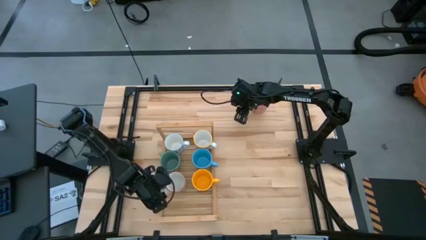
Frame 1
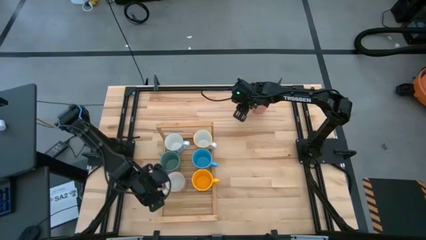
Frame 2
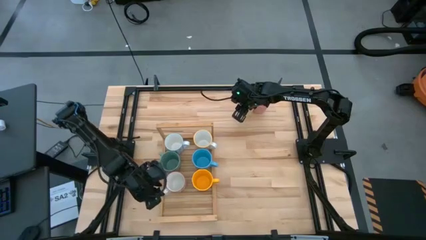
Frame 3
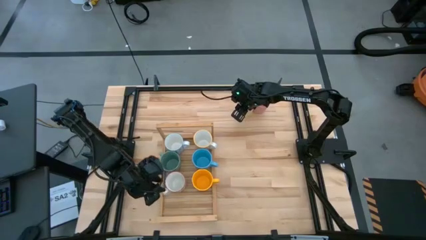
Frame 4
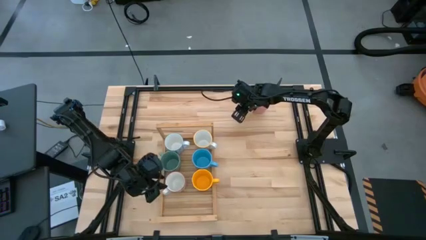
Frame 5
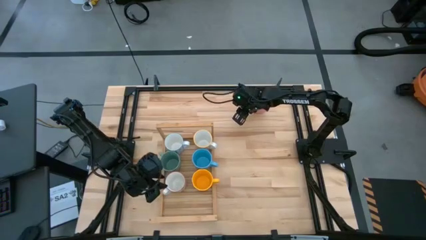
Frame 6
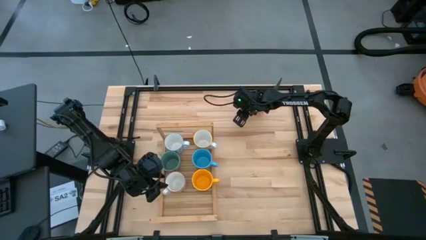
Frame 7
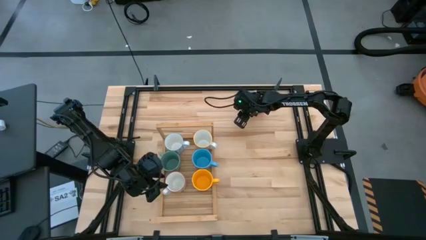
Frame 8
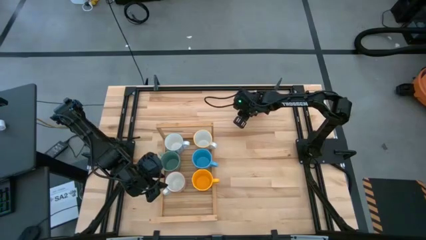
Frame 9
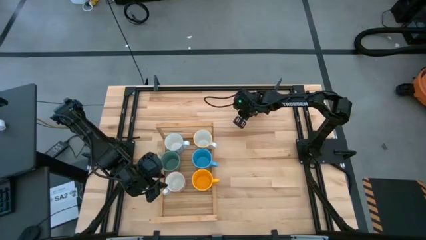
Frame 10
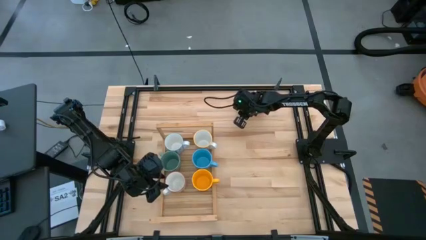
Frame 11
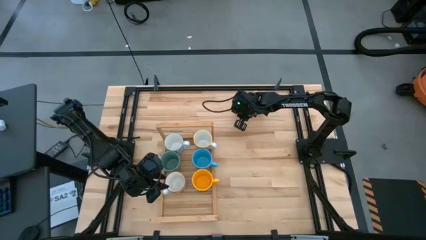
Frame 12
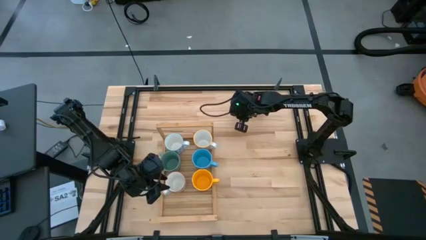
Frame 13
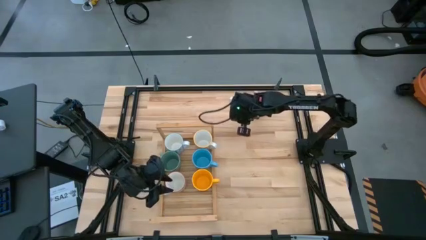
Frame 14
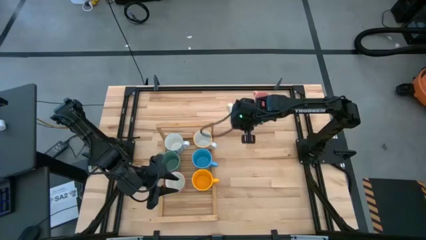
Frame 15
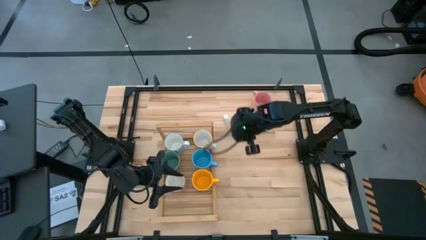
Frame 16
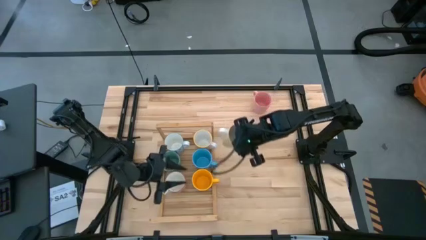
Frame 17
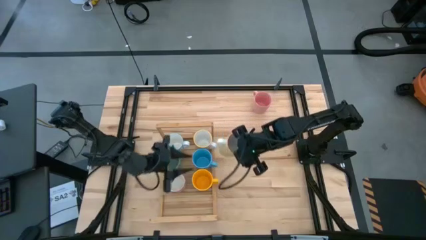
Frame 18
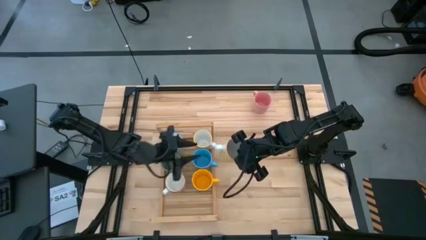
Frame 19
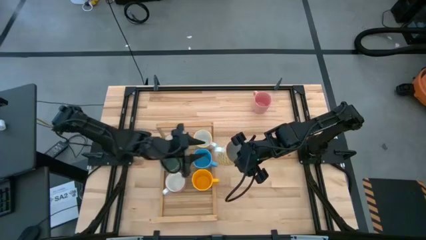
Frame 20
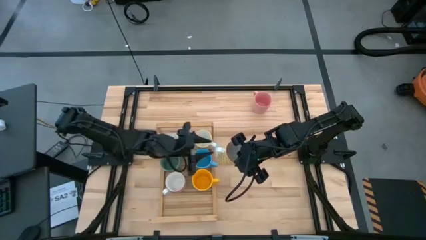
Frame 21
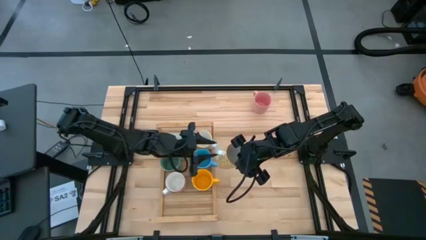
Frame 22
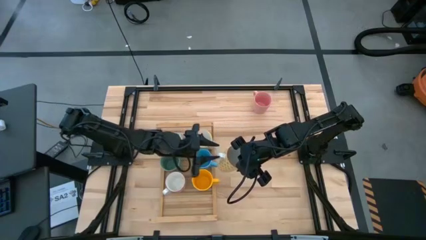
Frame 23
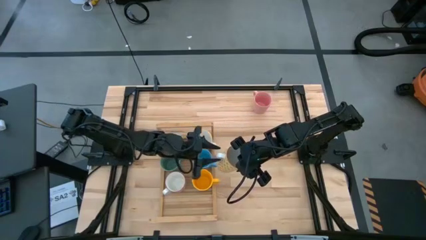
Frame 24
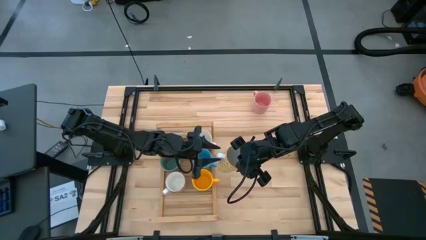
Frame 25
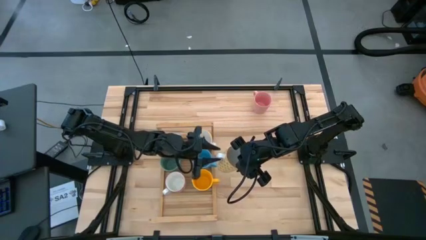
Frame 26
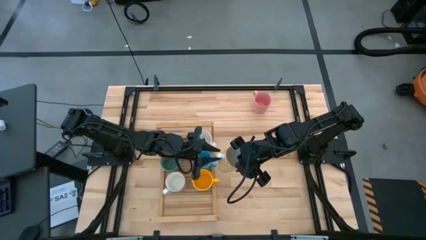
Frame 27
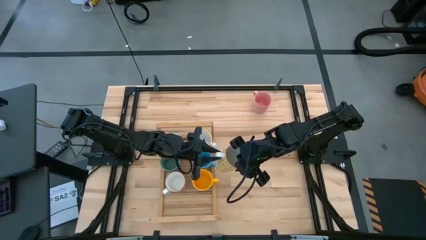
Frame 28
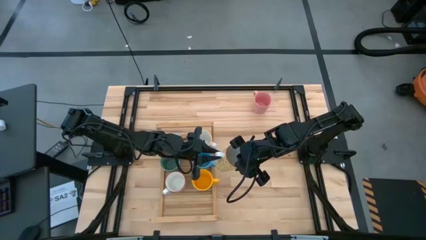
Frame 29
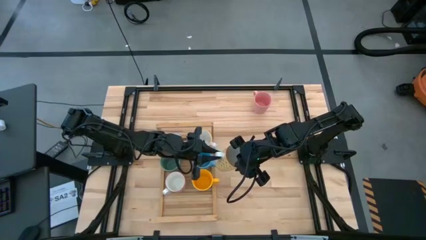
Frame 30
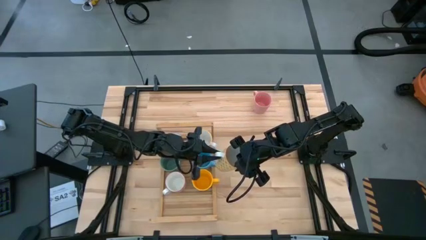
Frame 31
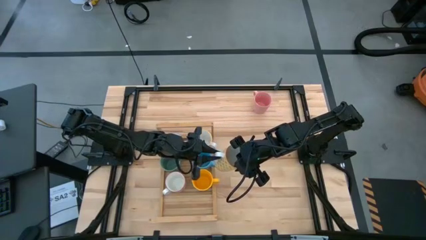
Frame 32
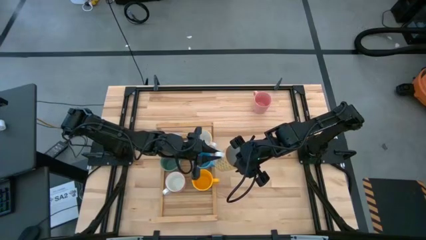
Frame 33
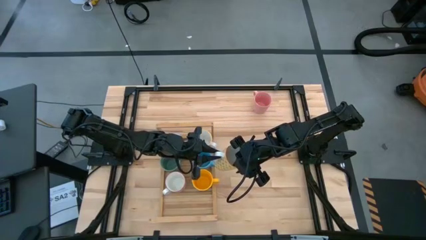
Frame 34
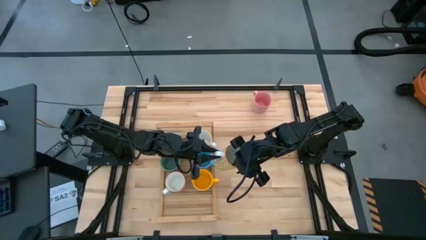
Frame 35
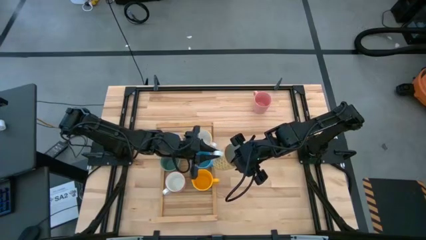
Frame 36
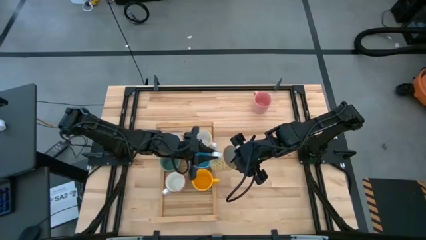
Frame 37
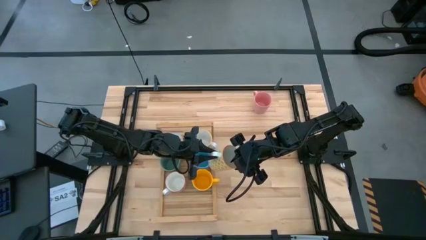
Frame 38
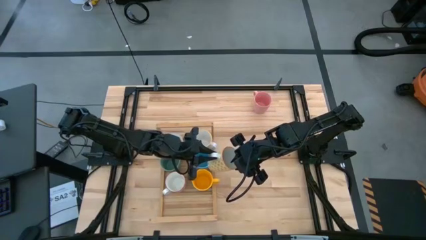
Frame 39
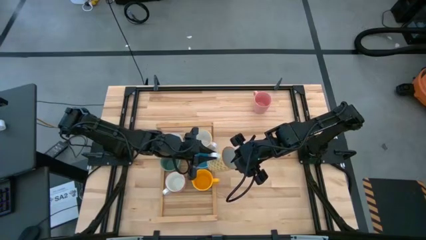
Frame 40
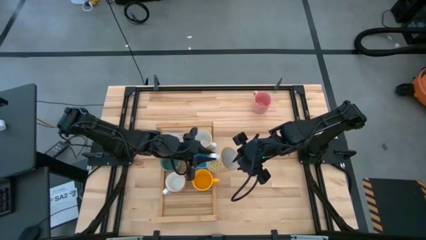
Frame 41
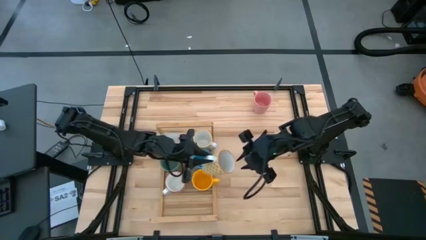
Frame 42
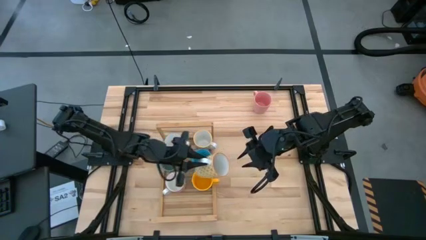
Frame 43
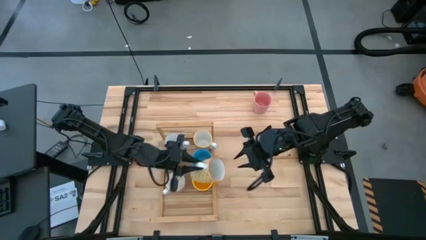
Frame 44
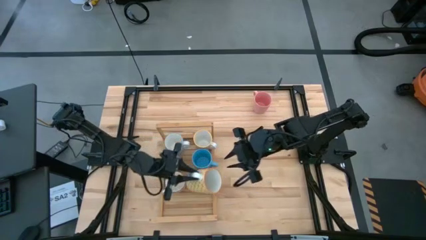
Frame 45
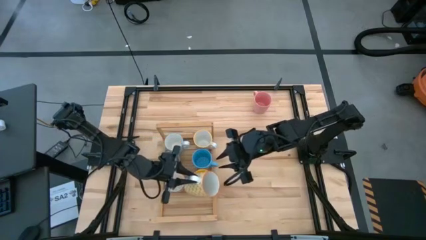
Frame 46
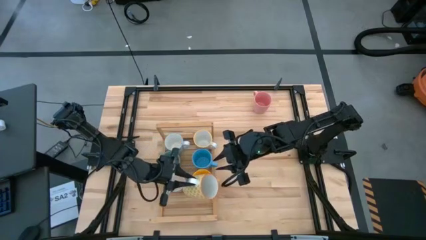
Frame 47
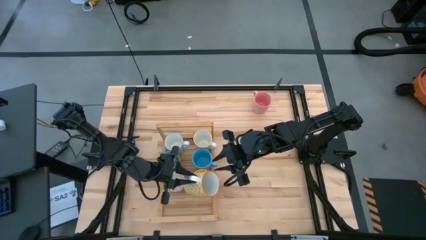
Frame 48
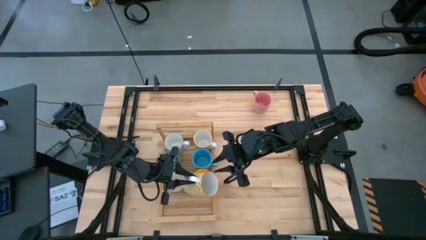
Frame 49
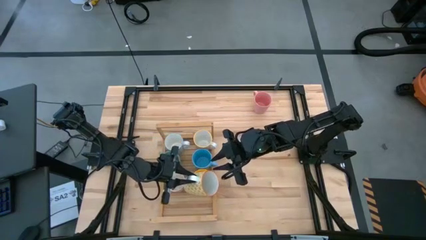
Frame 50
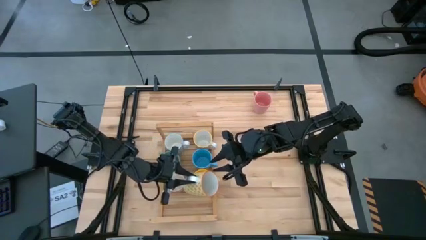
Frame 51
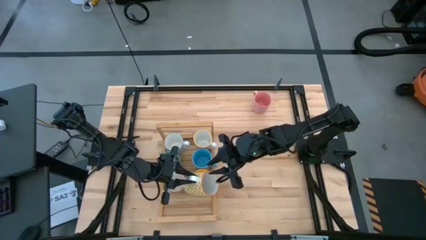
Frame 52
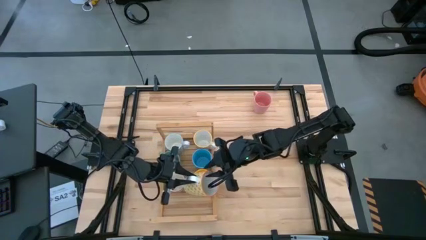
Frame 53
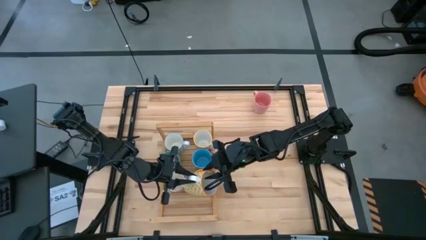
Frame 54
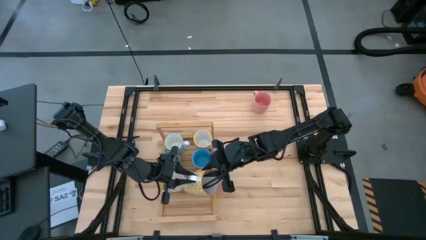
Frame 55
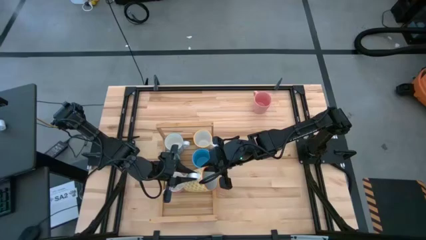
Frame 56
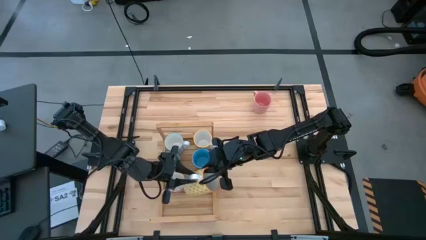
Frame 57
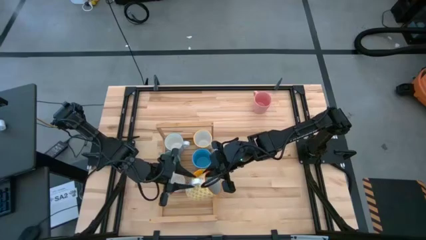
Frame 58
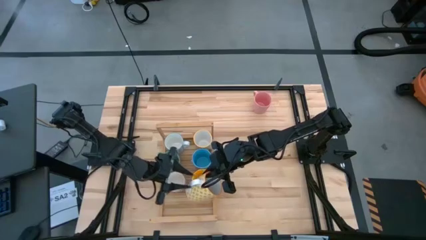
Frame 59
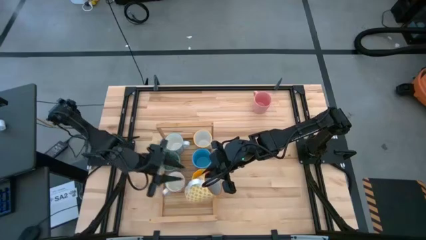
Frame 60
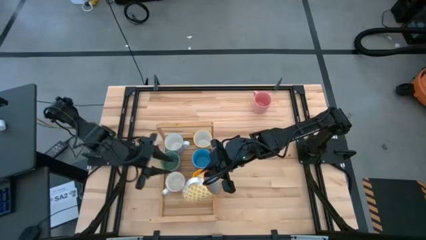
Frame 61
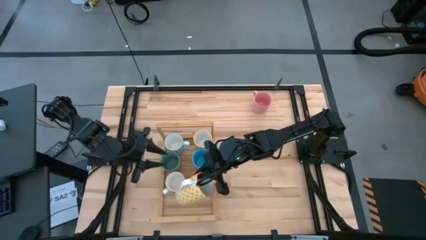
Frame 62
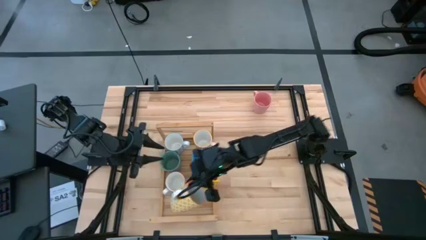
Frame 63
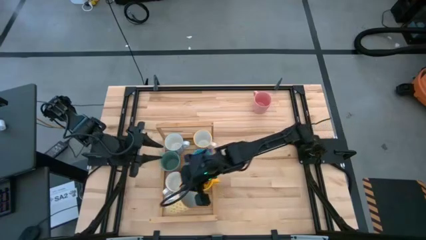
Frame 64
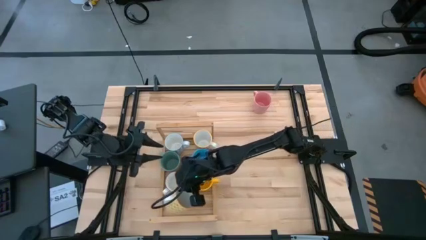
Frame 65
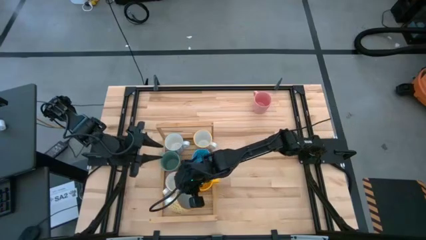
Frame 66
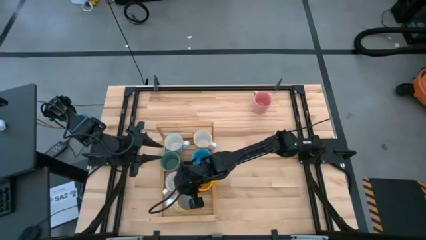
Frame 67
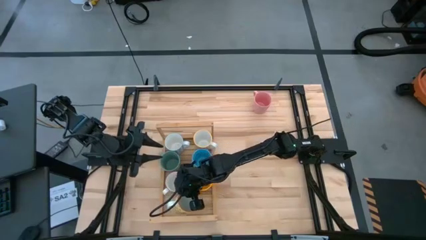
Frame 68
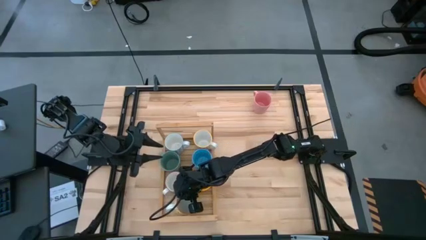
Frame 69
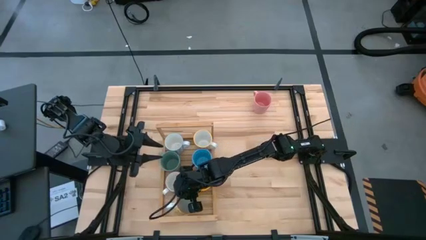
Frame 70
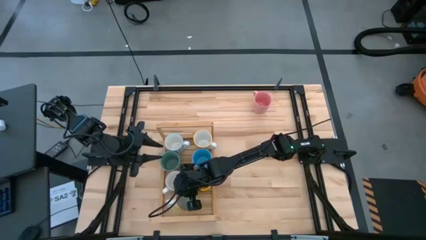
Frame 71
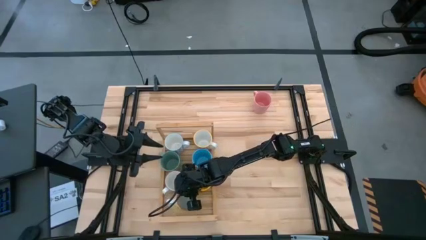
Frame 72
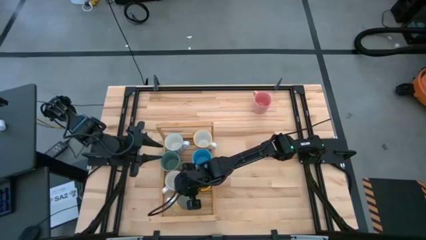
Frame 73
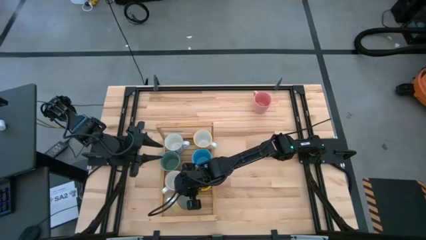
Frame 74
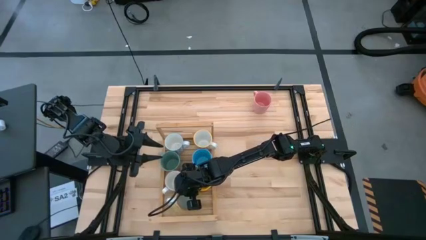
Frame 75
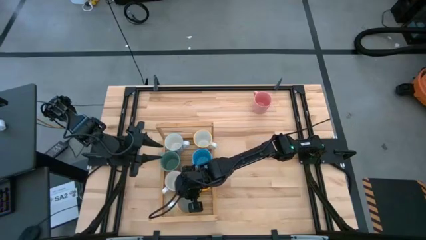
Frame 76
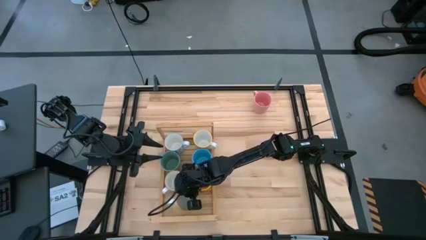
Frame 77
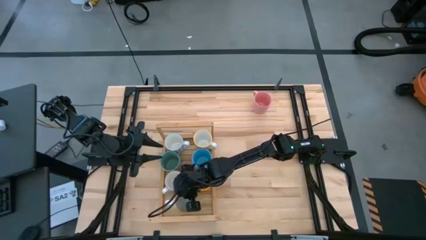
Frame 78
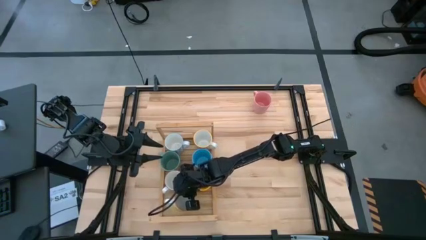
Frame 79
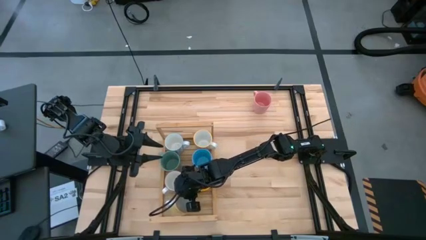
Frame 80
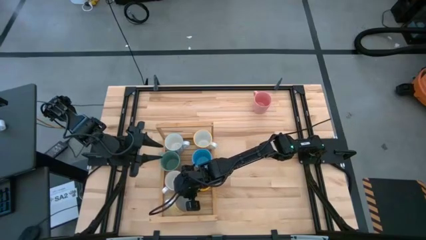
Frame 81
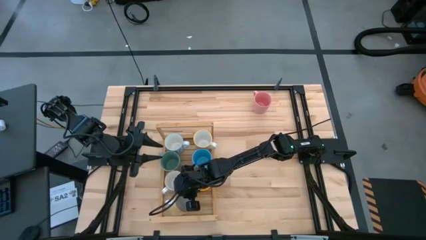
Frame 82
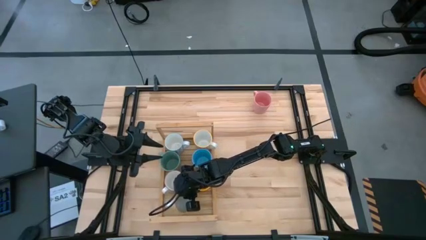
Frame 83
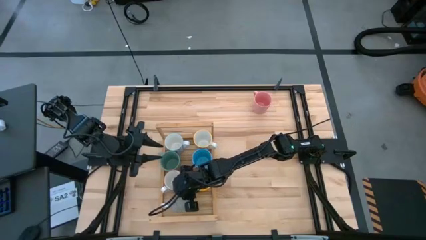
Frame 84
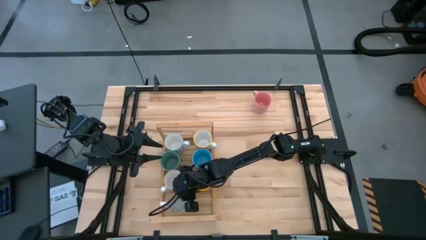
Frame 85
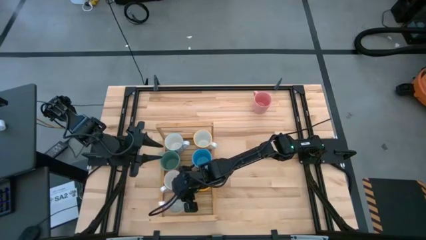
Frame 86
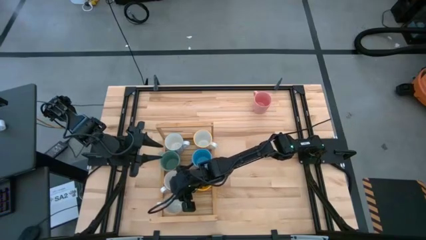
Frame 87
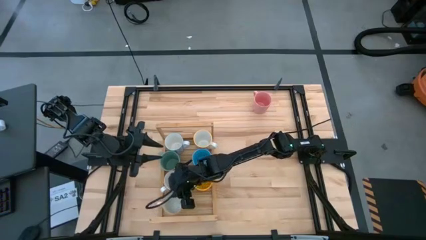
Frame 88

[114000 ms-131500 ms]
Task: Place coffee mugs
Put the yellow and white mug on the shelf
